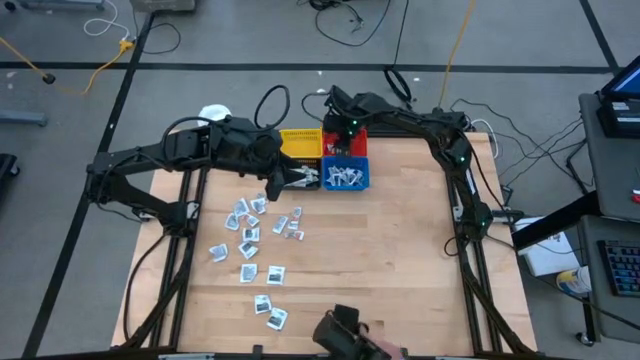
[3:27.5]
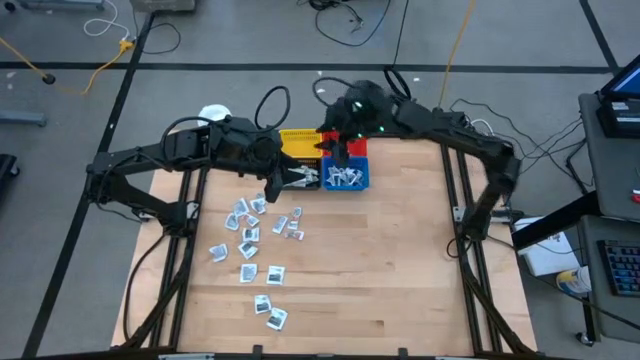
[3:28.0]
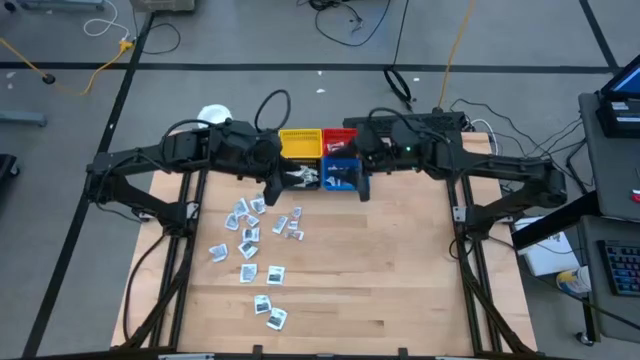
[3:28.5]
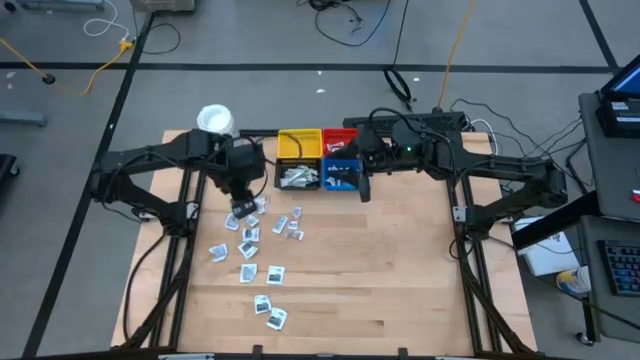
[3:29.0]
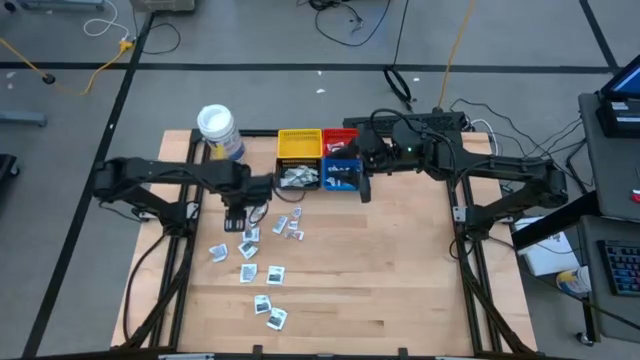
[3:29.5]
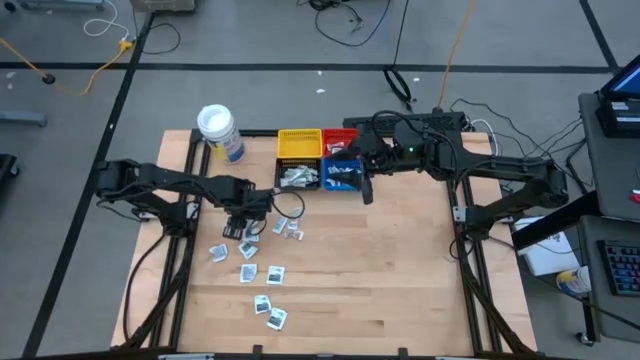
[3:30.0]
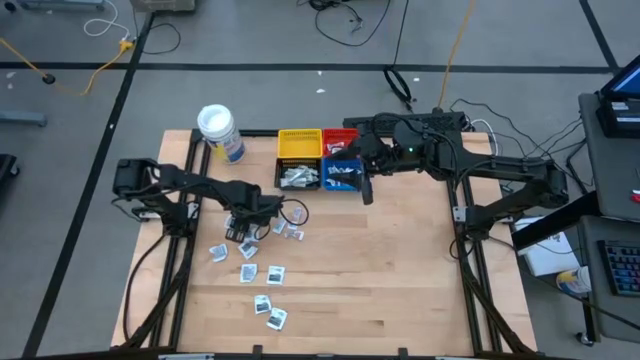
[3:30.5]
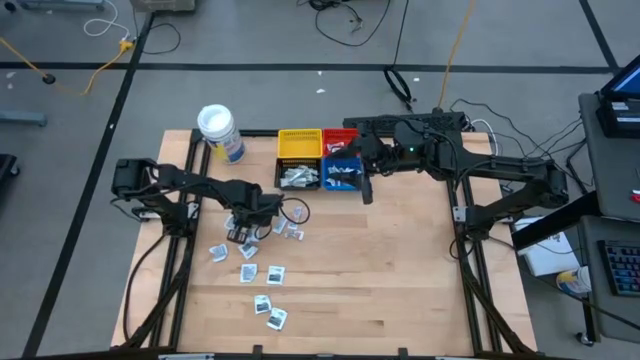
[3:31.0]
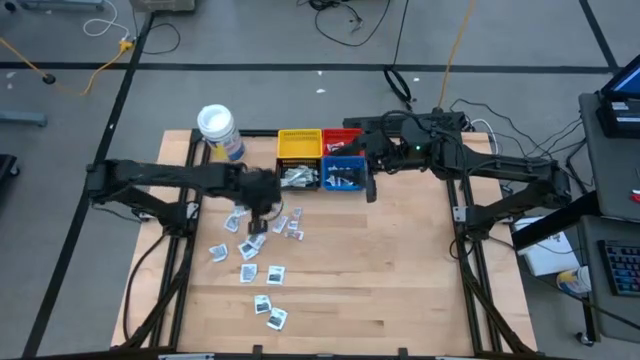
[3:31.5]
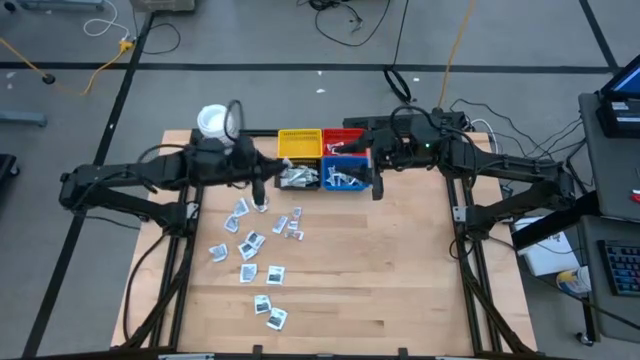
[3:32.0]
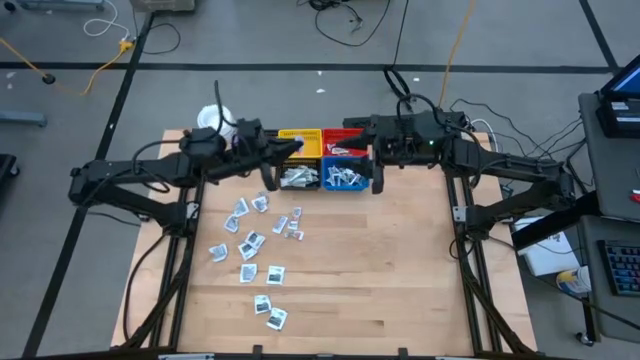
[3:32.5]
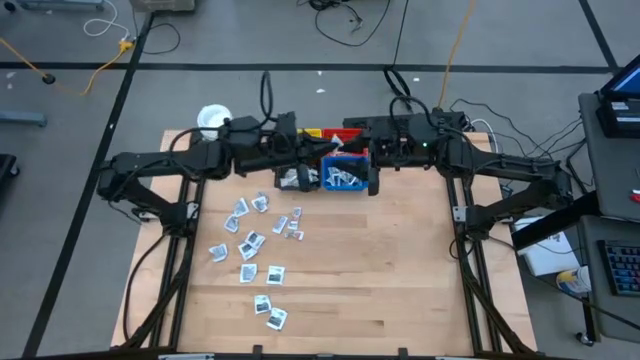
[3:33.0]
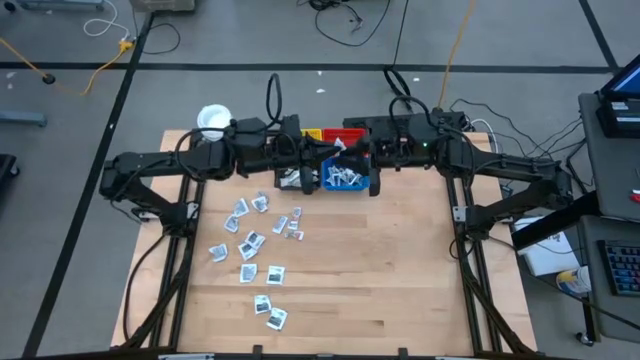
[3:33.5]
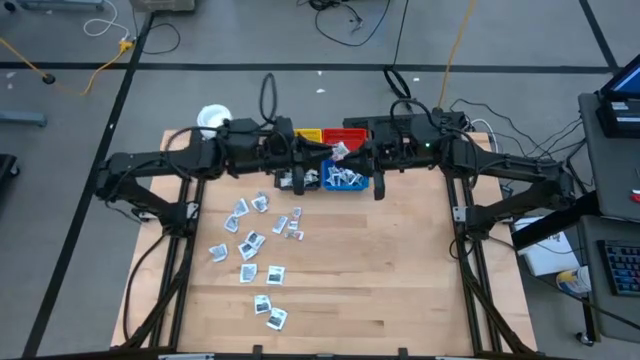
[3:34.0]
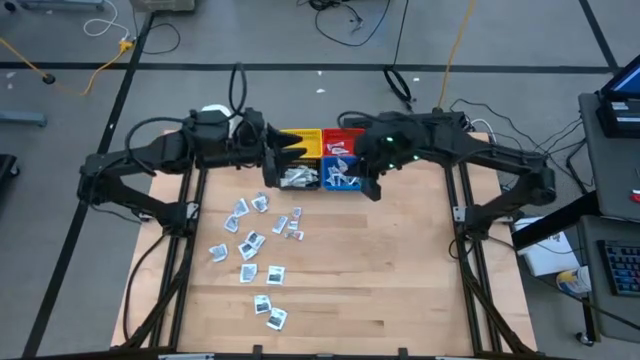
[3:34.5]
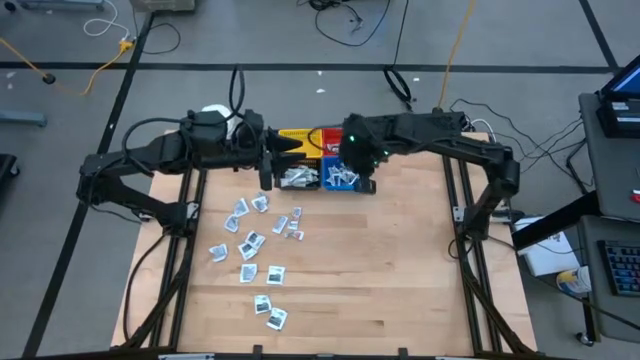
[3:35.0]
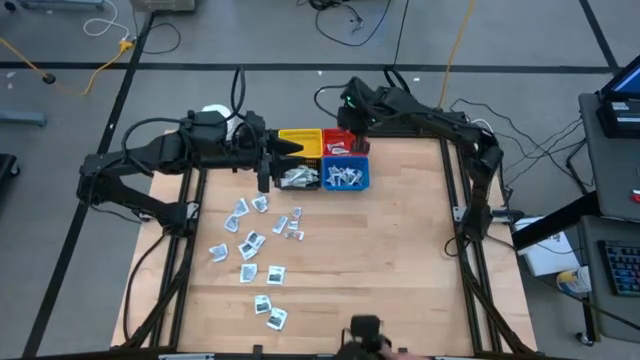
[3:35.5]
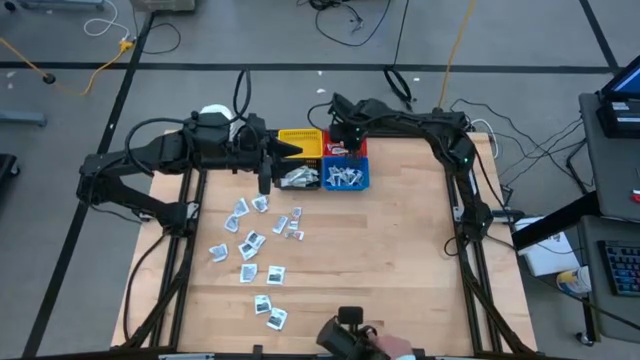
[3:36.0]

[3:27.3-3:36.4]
Task: Pick & Place First Aid Supplies
Put the orange ointment pack into the red basket

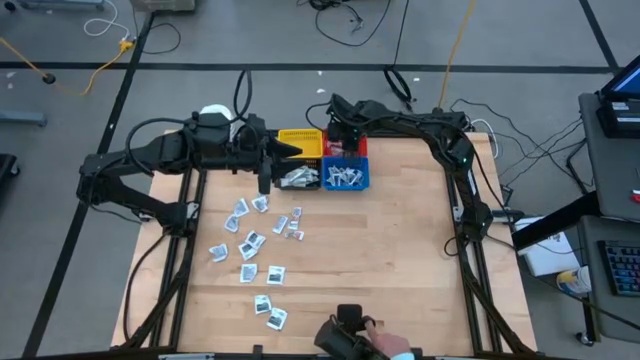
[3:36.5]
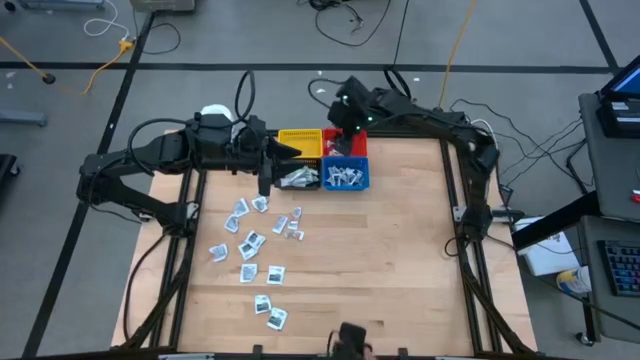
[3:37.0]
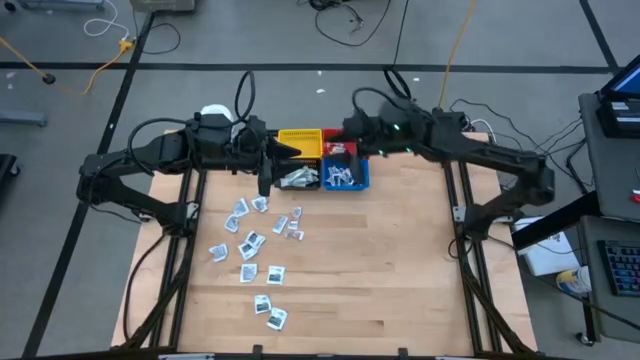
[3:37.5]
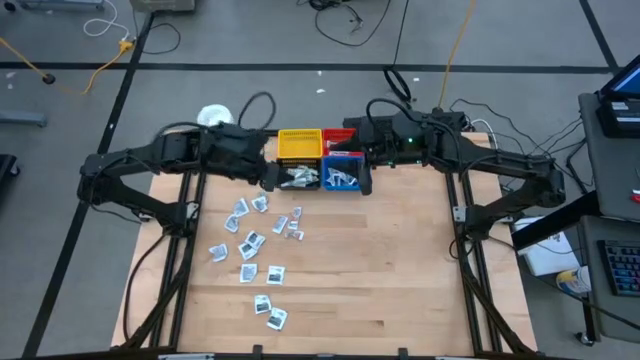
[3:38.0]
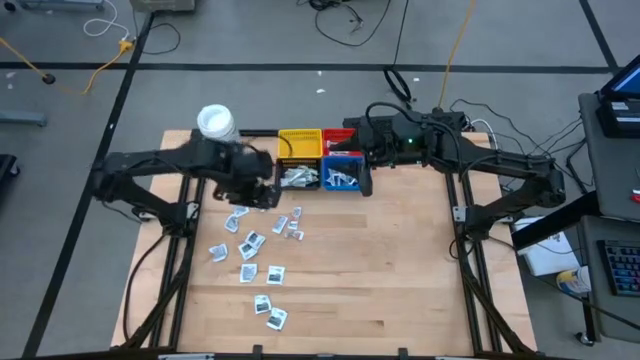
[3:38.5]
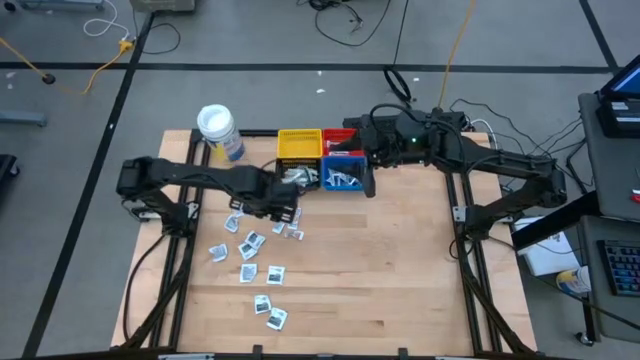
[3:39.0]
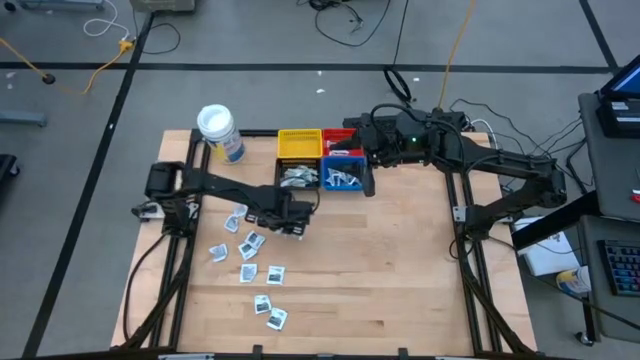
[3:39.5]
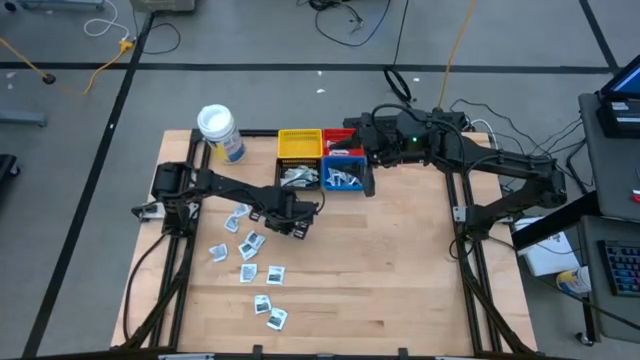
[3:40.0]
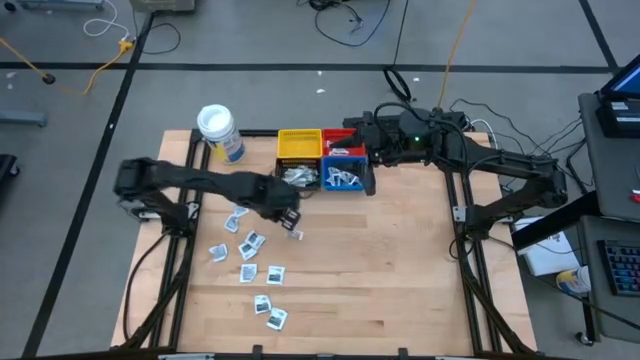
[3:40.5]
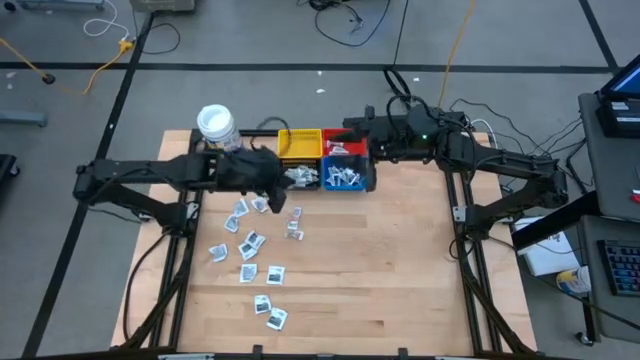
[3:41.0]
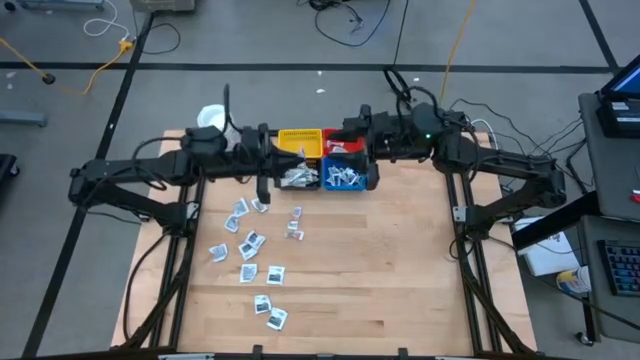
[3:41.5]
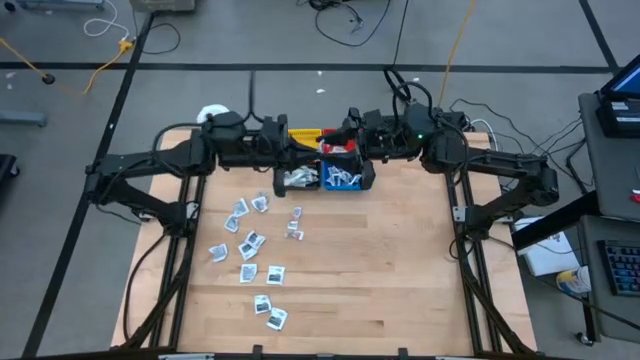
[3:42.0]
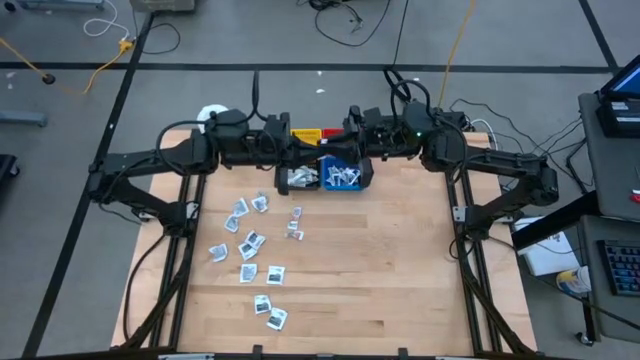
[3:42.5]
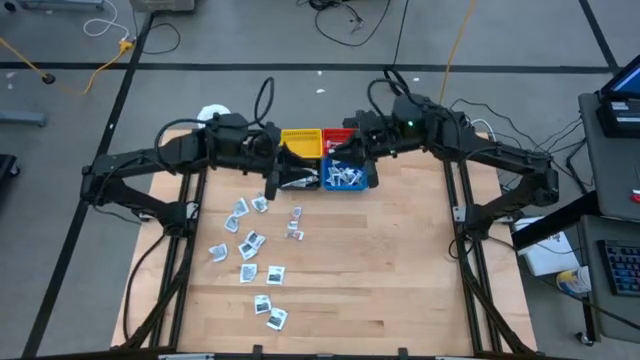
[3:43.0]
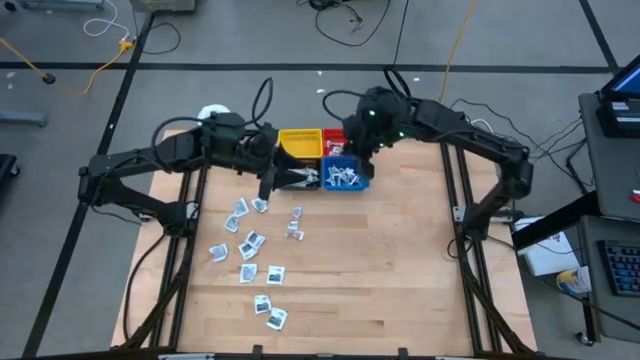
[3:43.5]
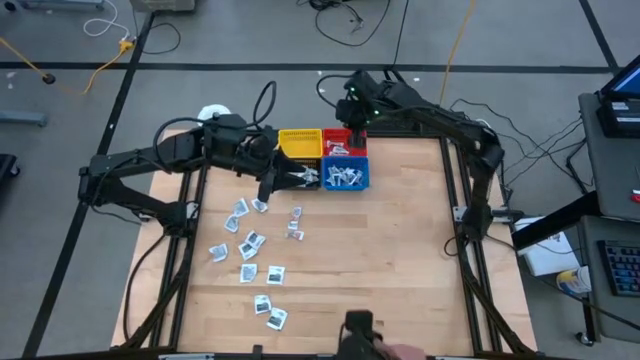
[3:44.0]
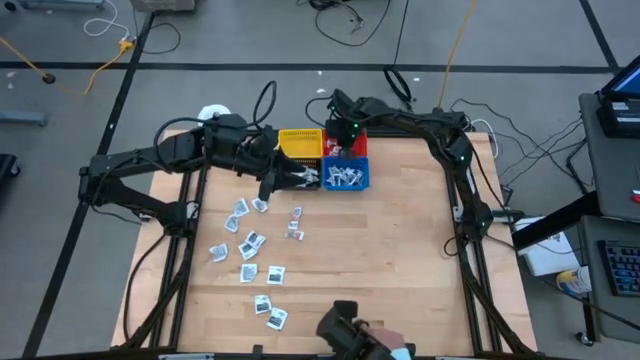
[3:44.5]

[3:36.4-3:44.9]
Put the orange ointment pack into the red basket

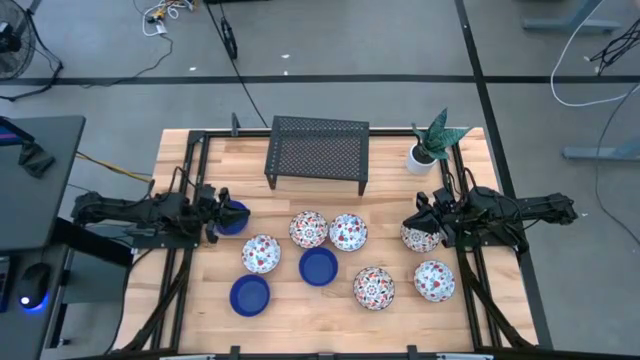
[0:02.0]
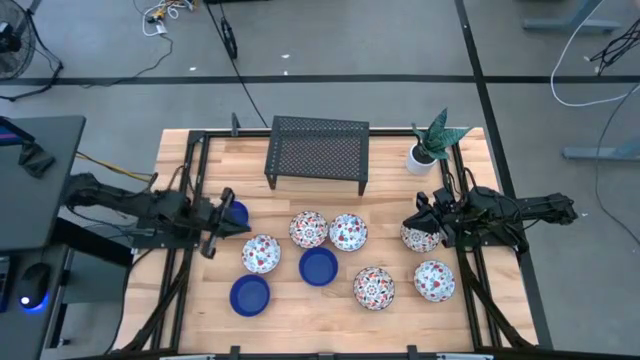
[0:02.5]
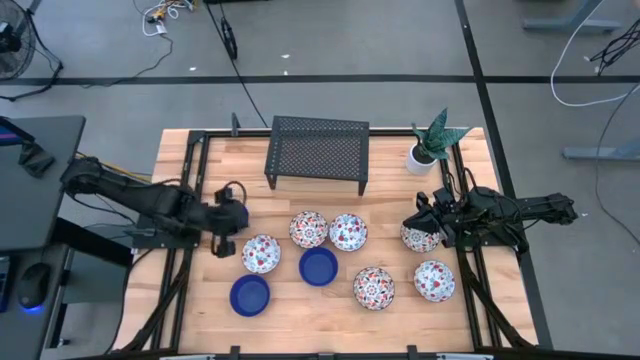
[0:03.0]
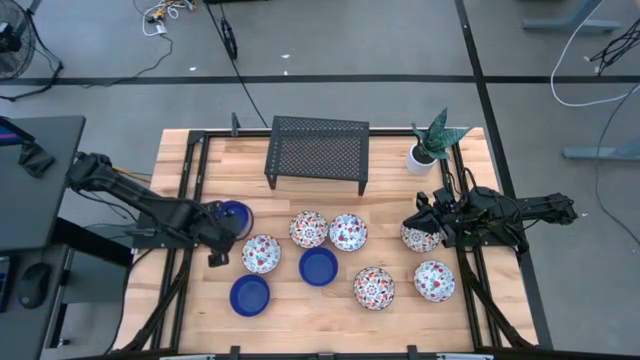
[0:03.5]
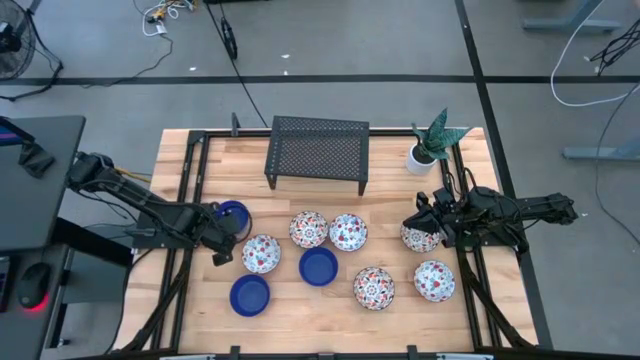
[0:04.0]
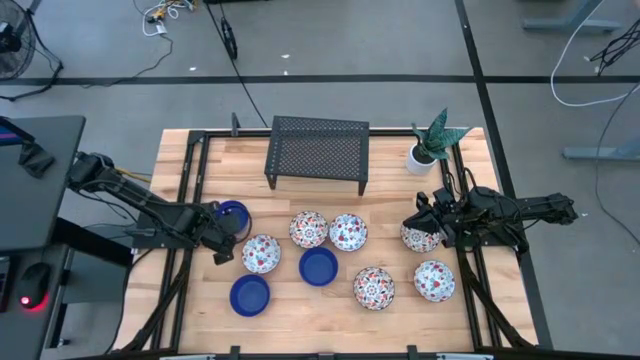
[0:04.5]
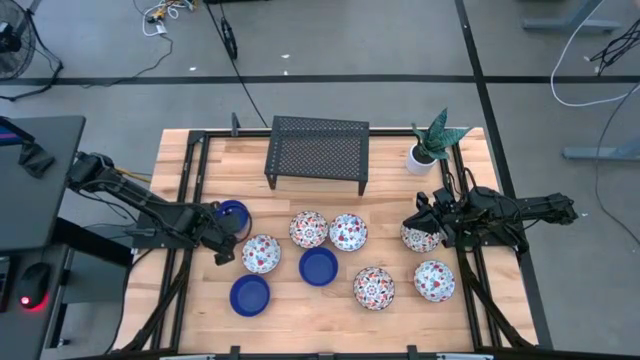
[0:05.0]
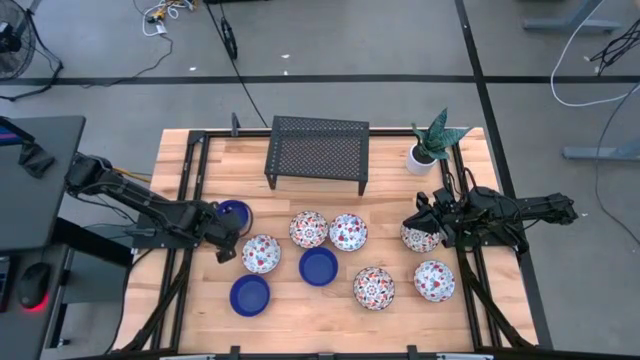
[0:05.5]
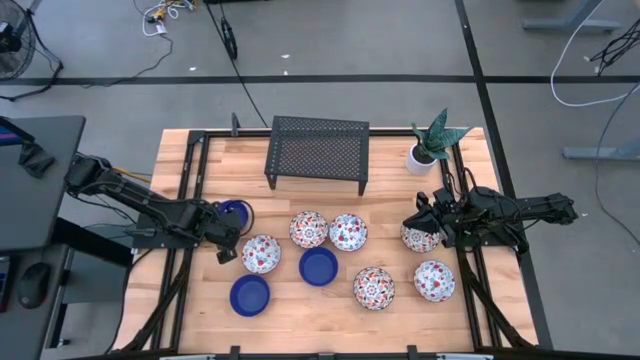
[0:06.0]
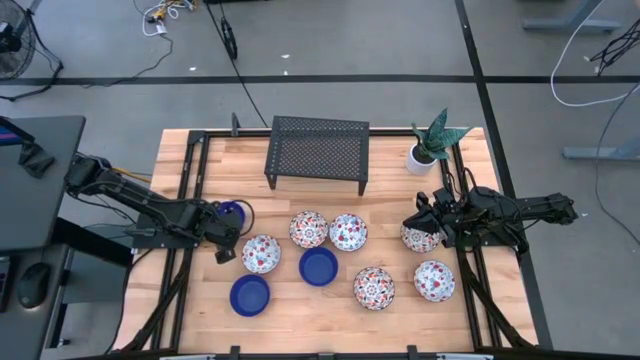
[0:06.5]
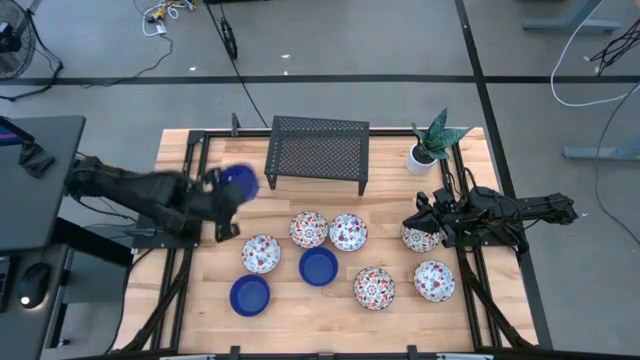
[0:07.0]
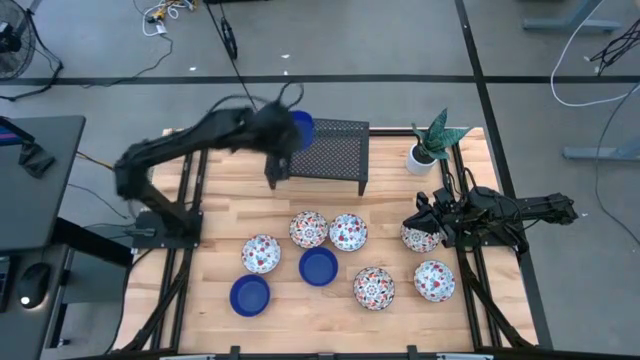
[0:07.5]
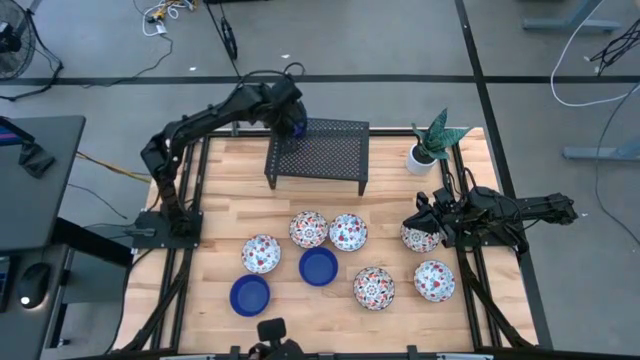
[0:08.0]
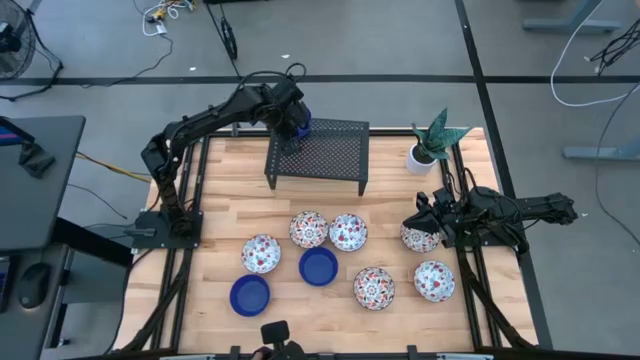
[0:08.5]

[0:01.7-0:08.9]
Task: Pick & Place Mini bowls
Put the top blue bowl on the shelf
